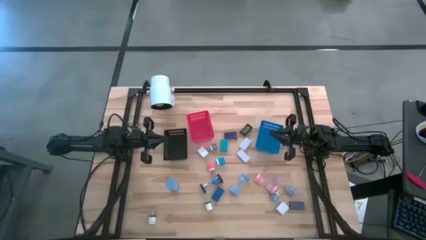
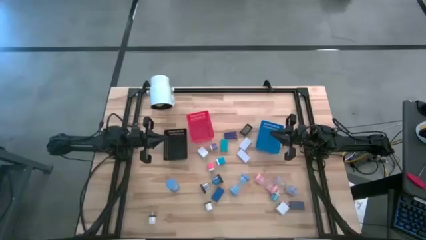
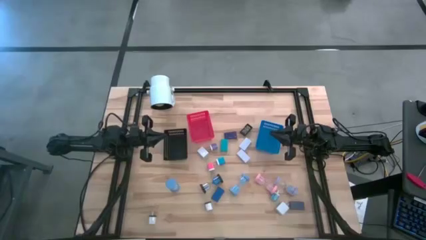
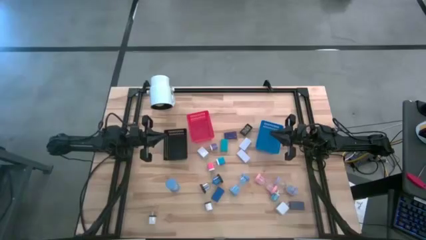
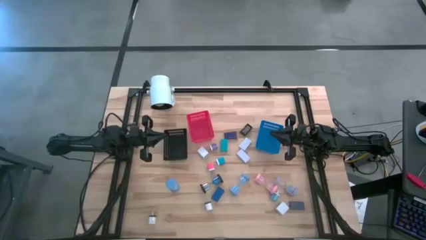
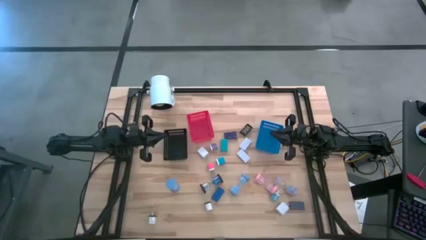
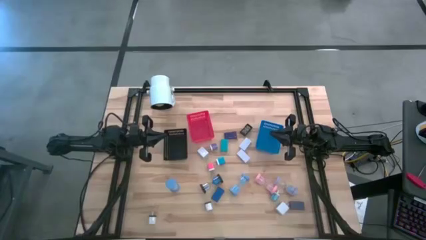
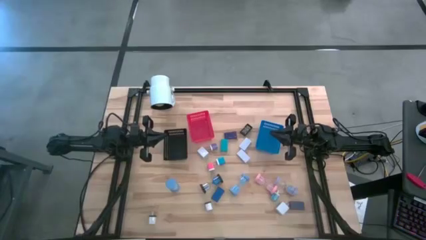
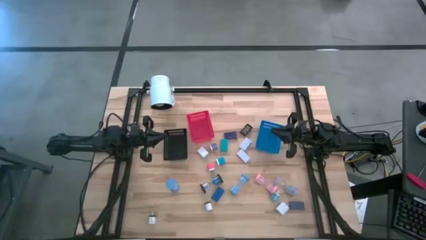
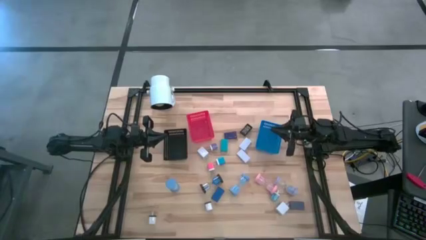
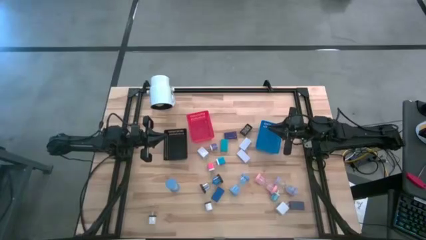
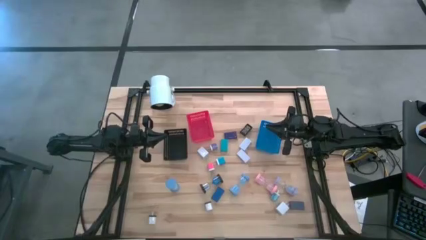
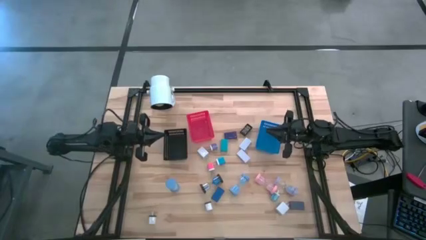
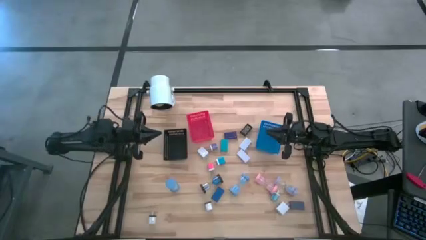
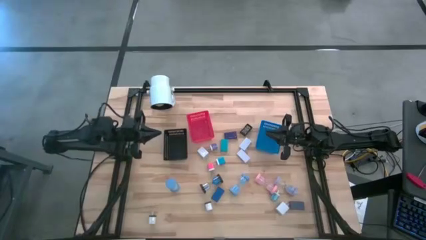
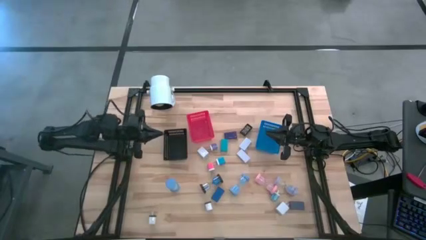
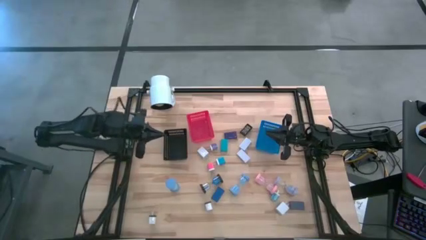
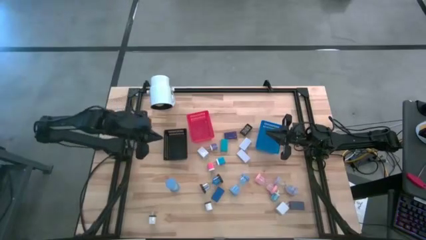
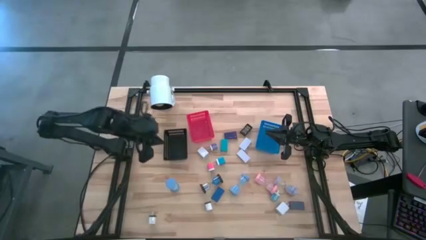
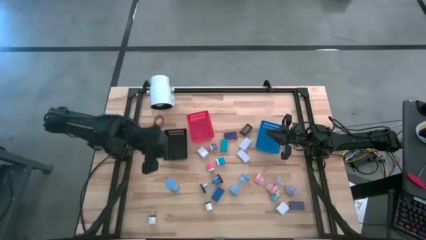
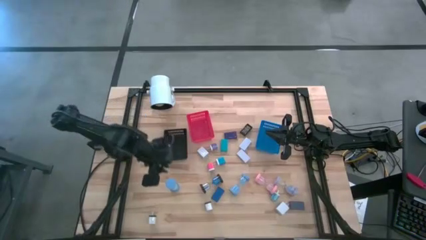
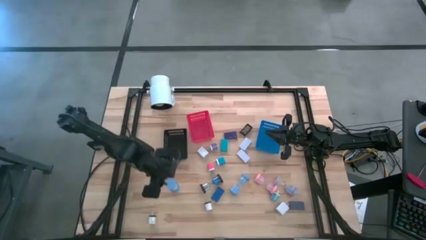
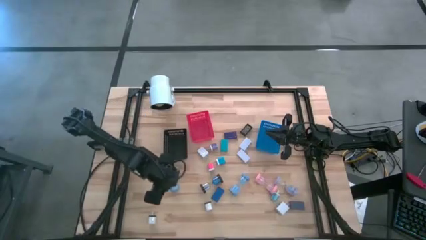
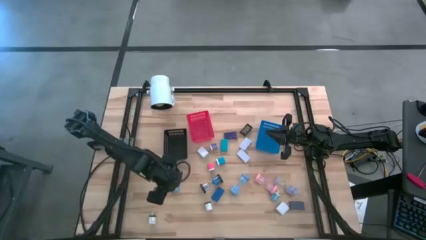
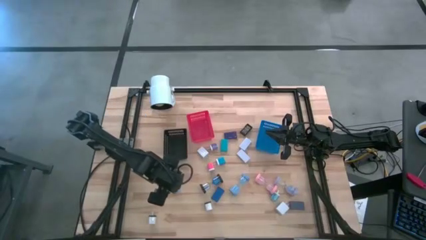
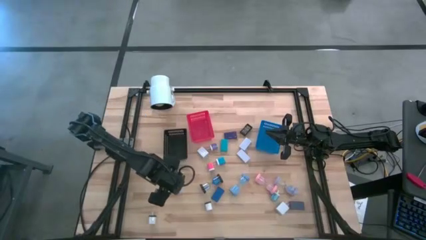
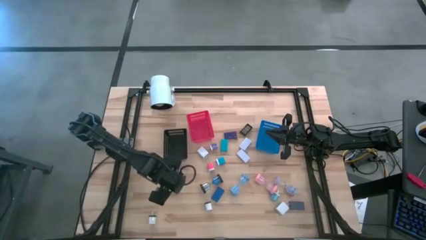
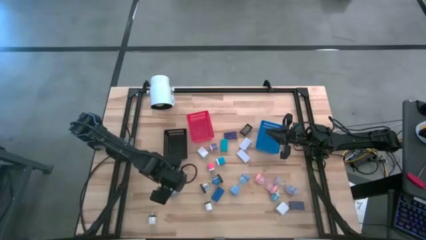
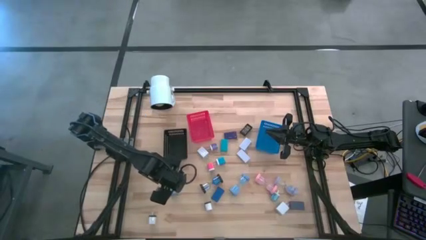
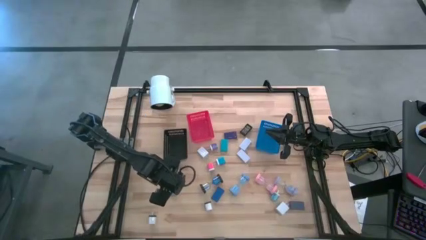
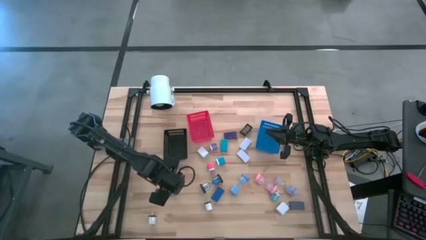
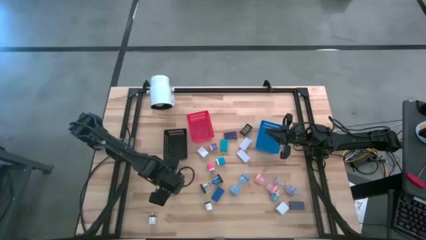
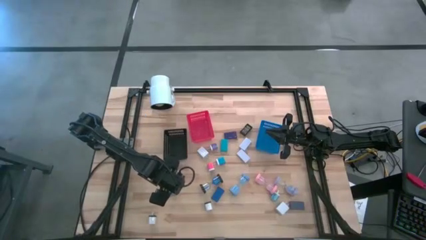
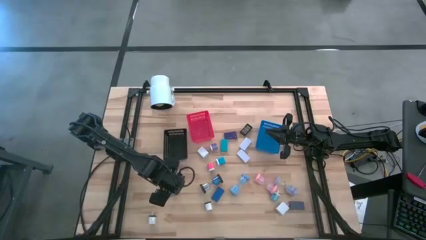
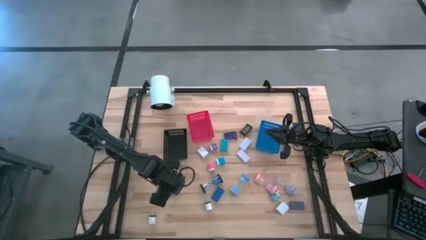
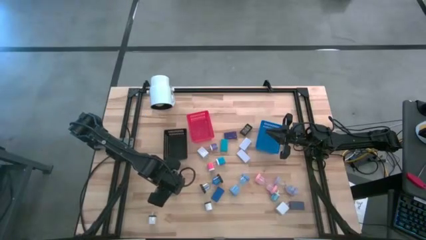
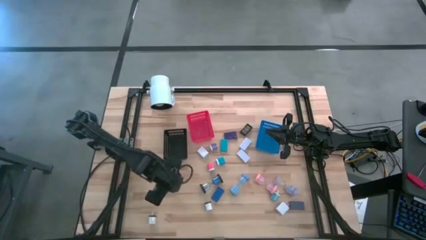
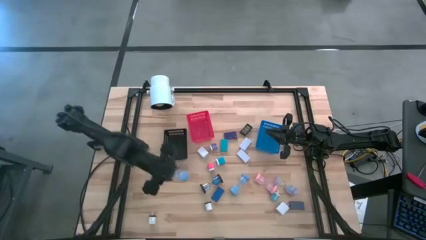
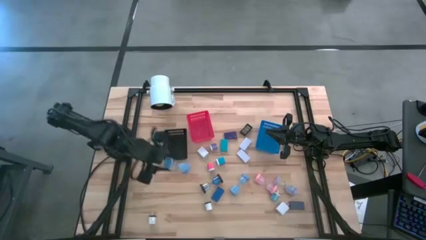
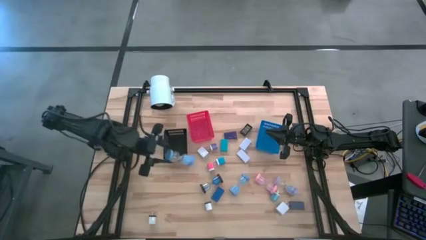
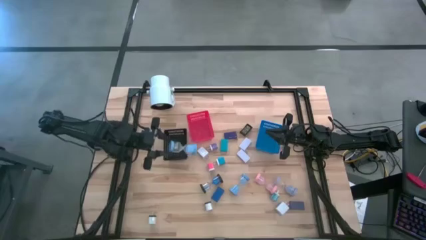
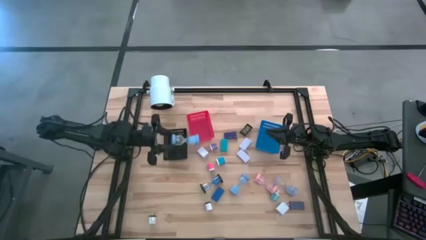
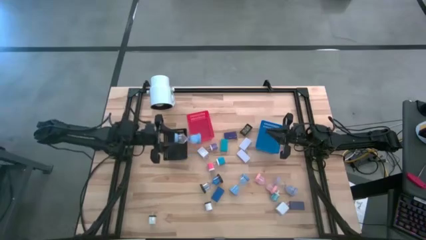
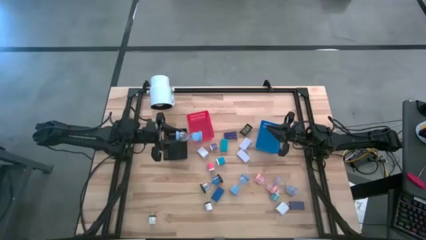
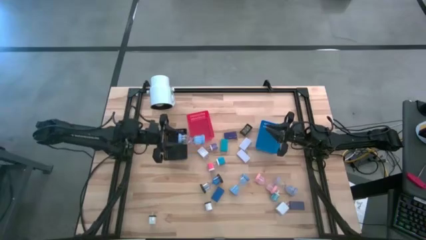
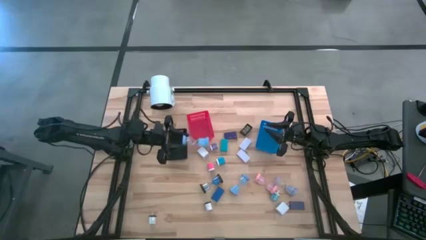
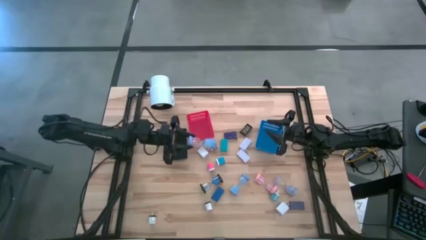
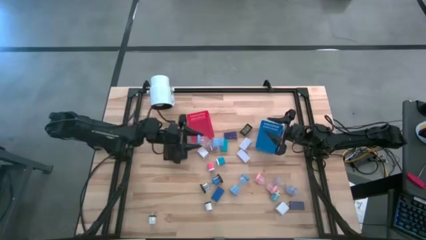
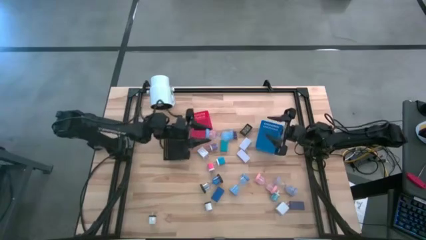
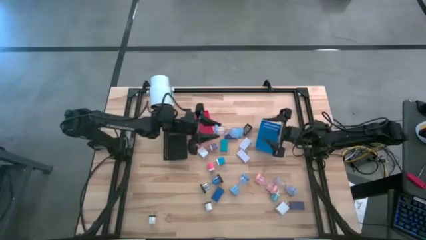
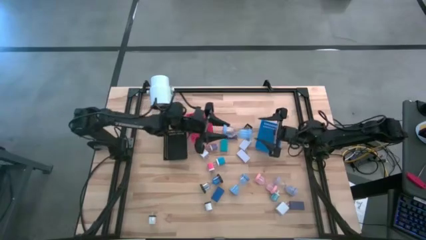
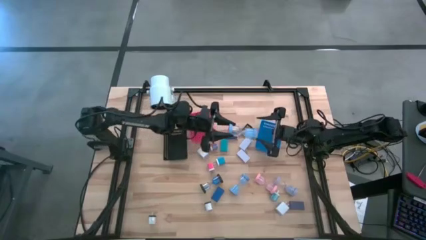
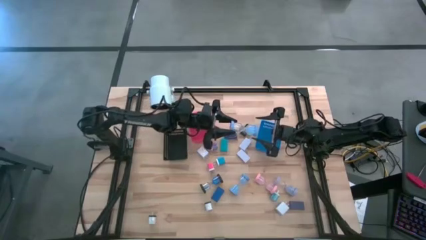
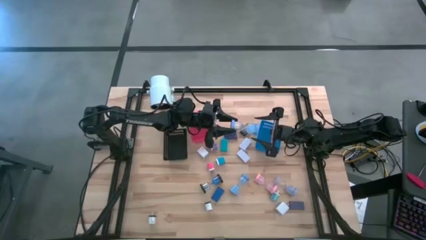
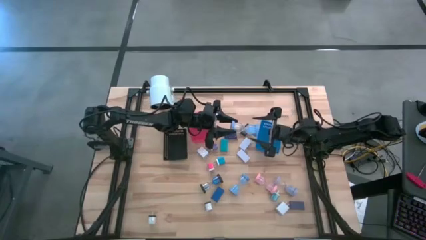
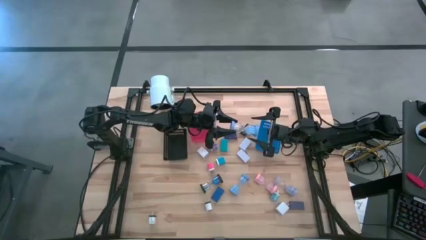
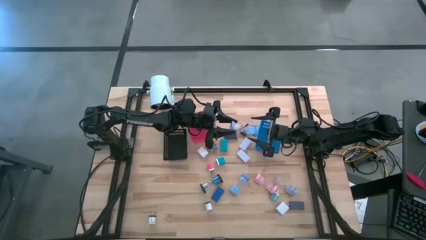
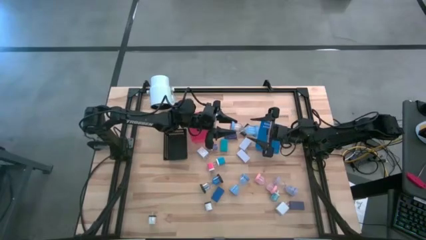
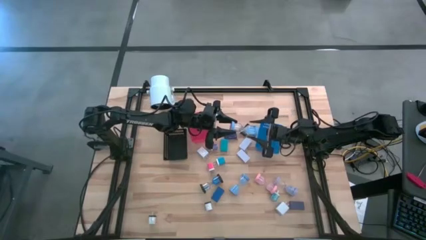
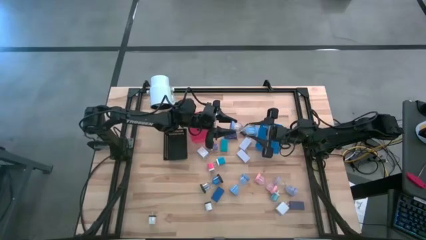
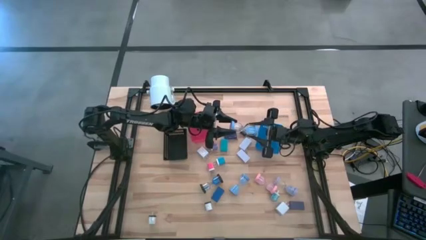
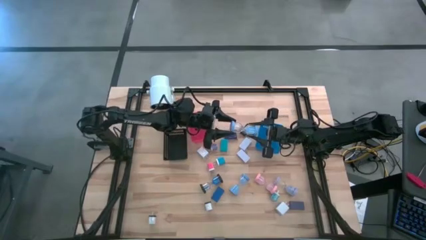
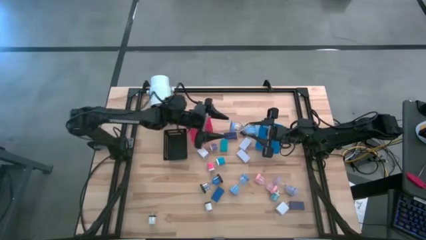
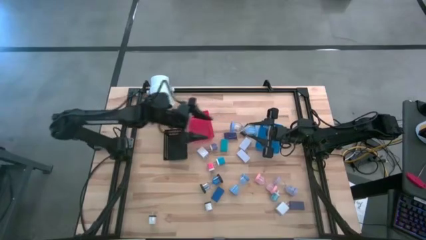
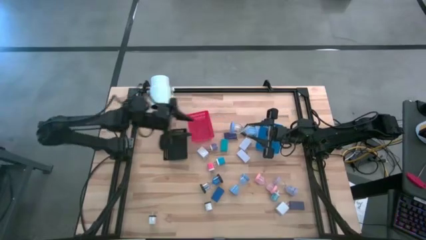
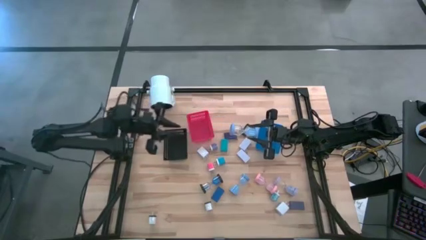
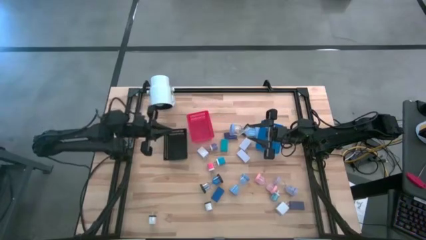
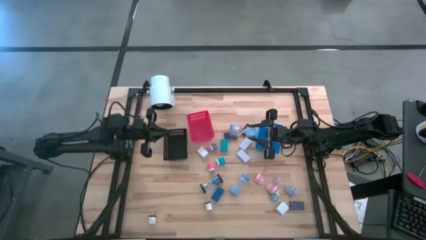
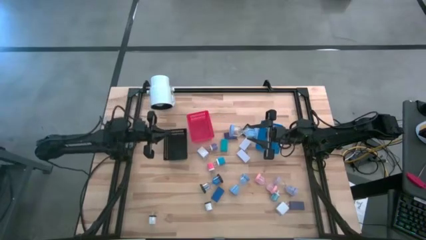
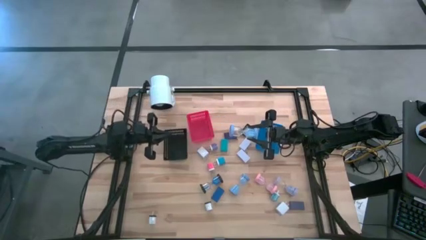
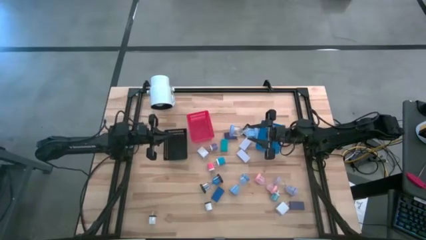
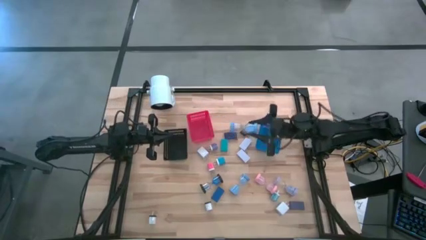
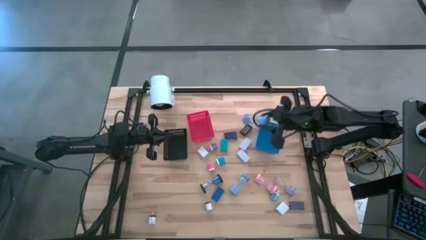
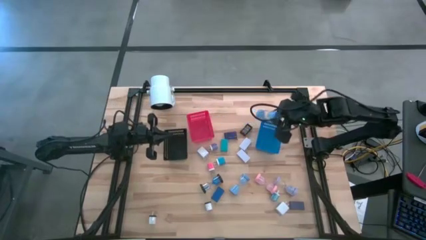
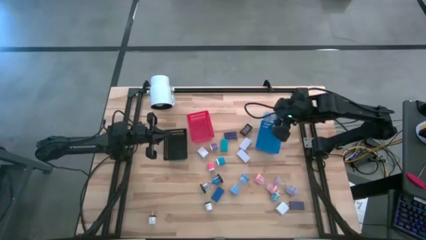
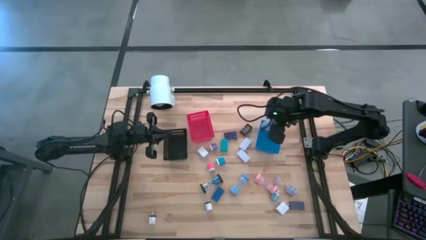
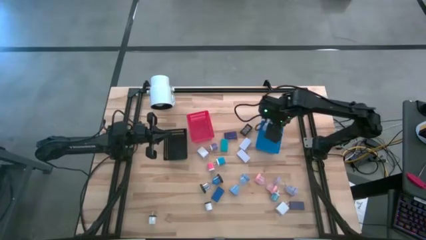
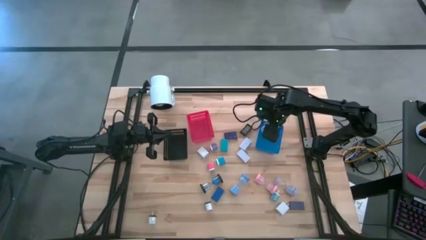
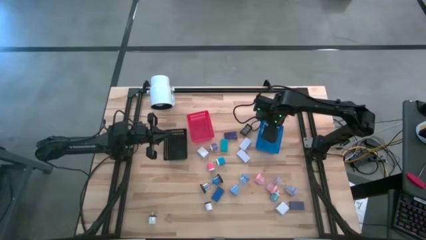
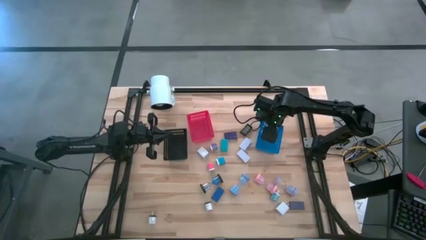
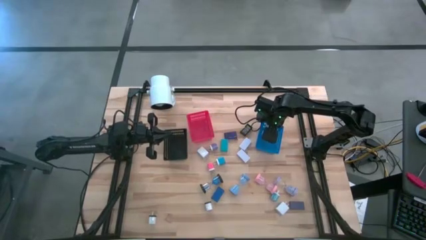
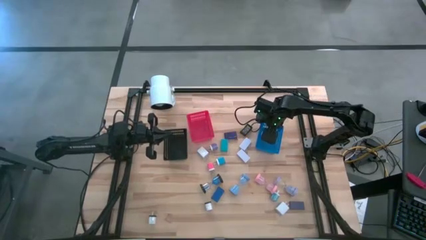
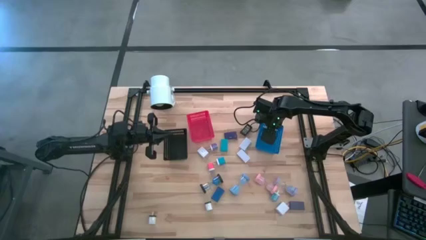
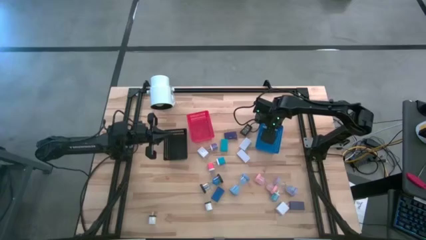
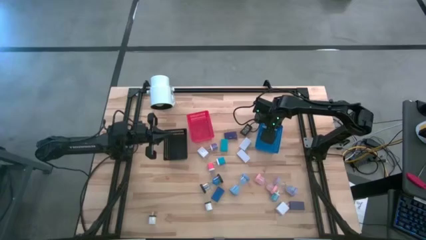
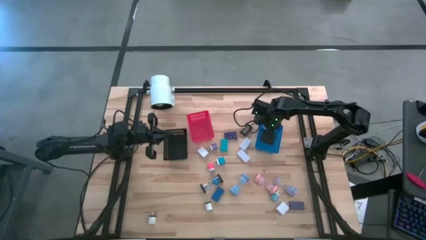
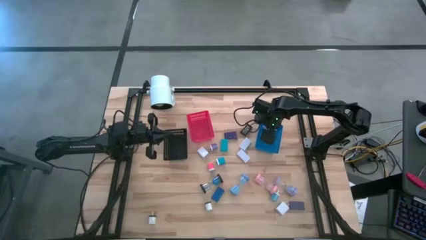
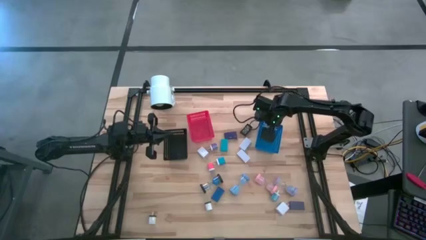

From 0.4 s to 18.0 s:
Task: Pick & Place Office items
Put the left blue hourglass into the blue bin
